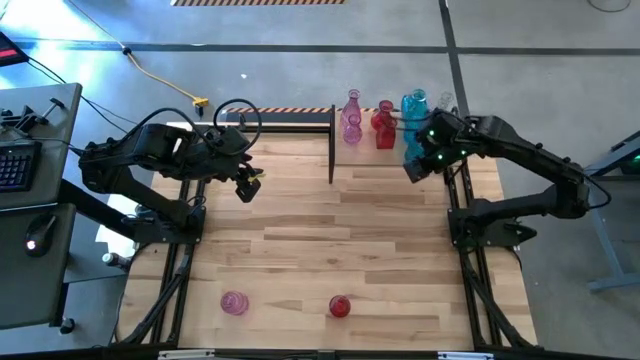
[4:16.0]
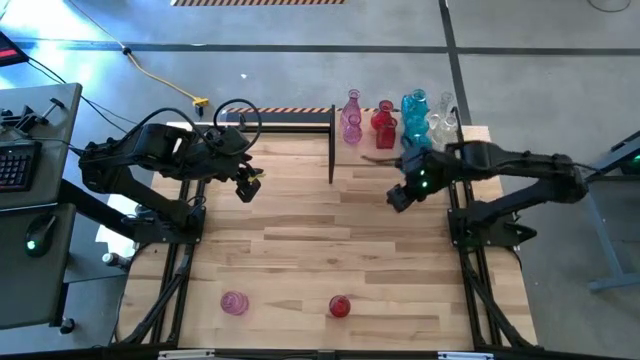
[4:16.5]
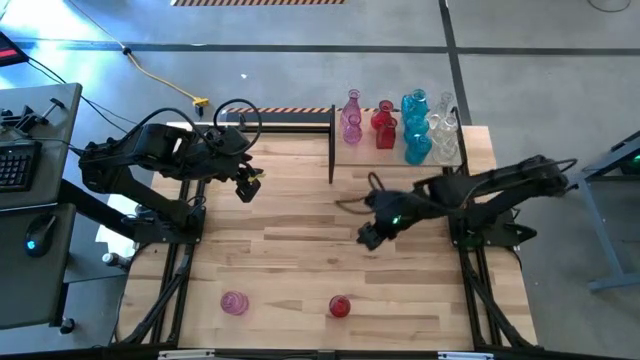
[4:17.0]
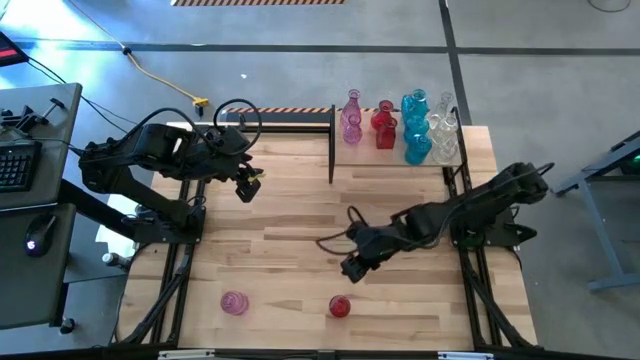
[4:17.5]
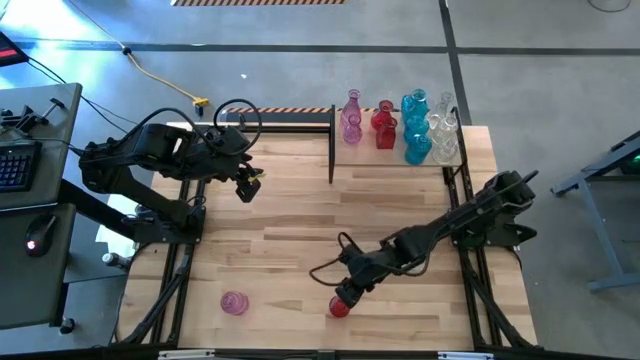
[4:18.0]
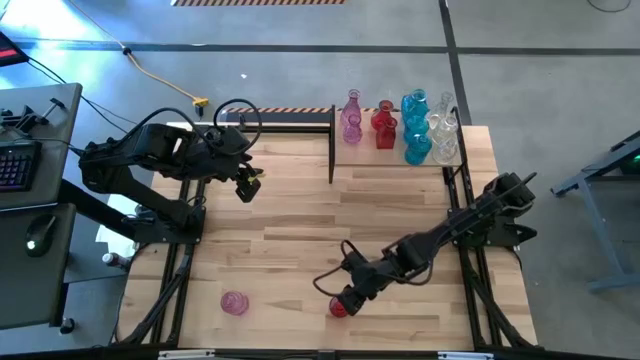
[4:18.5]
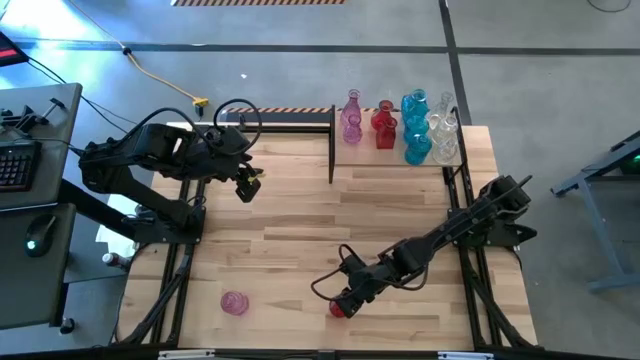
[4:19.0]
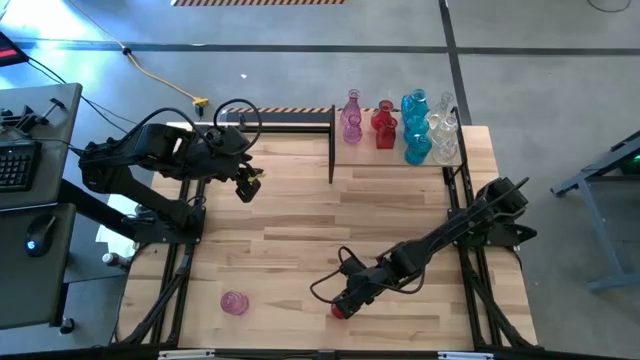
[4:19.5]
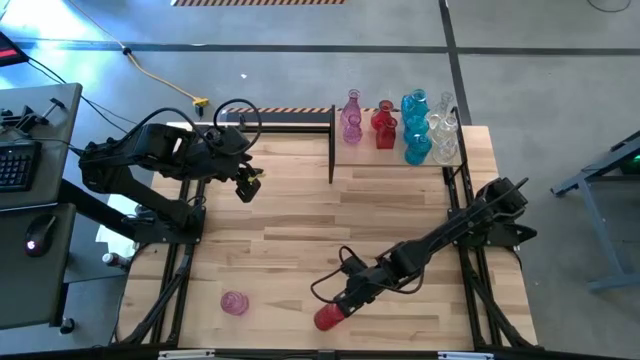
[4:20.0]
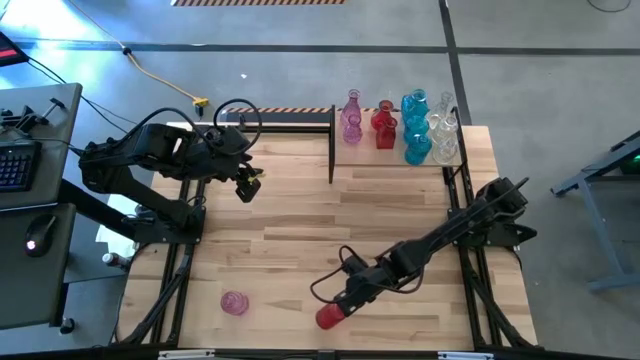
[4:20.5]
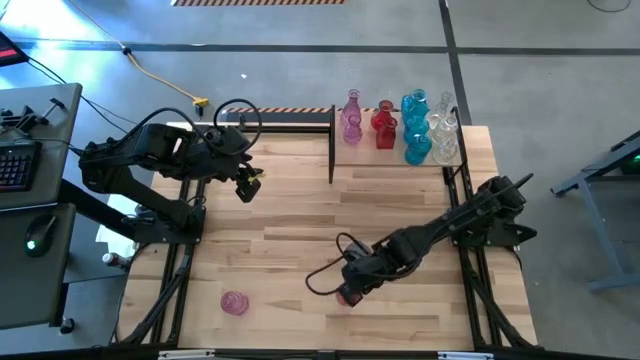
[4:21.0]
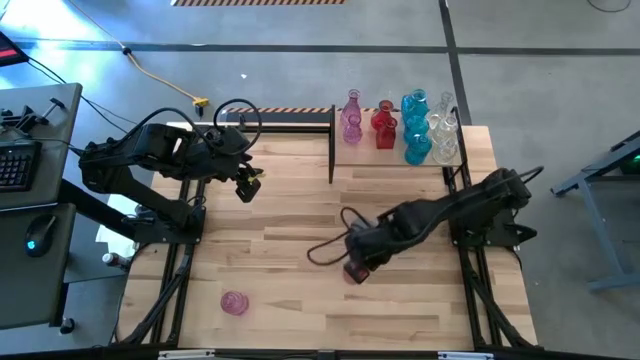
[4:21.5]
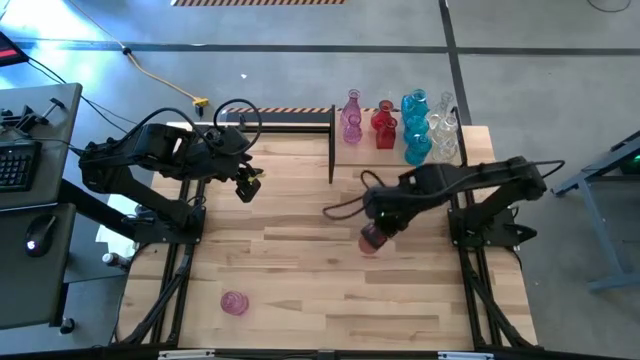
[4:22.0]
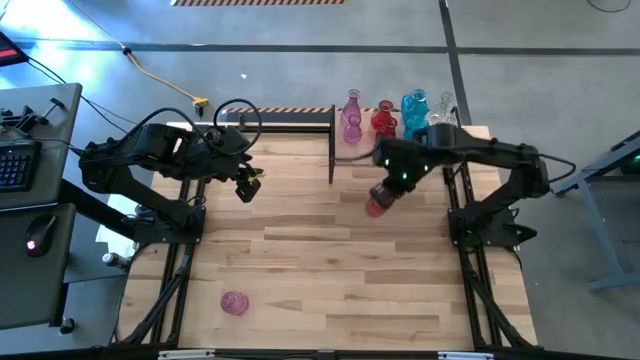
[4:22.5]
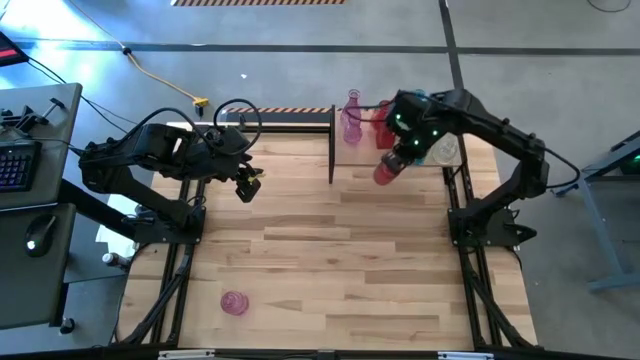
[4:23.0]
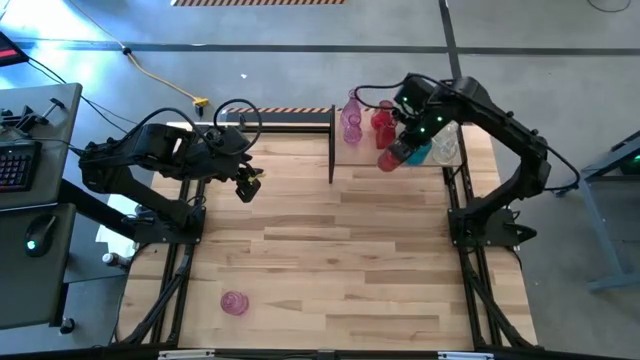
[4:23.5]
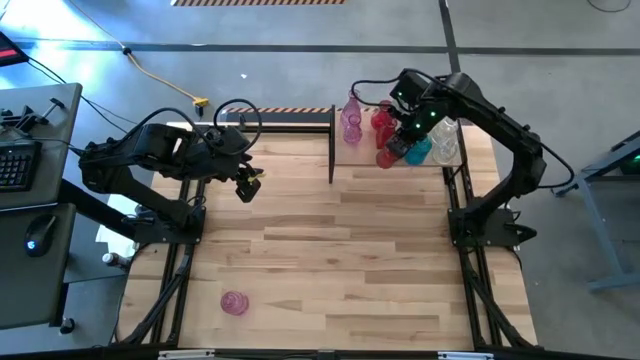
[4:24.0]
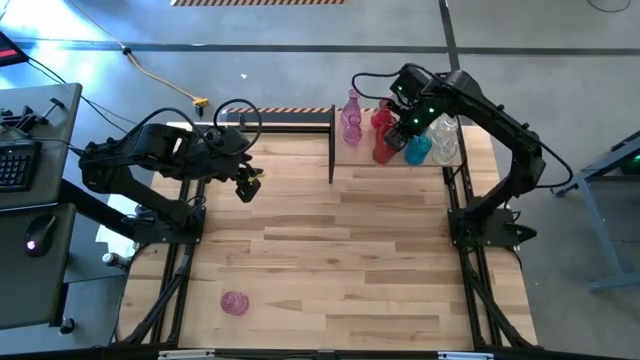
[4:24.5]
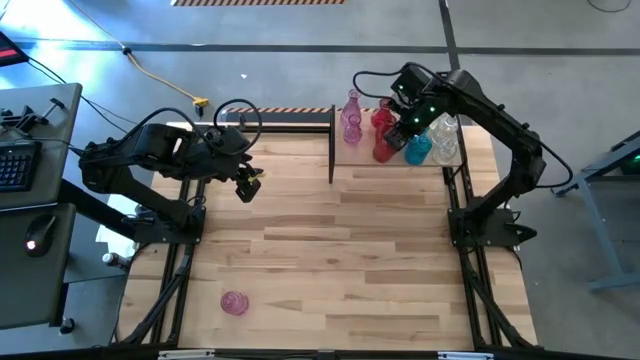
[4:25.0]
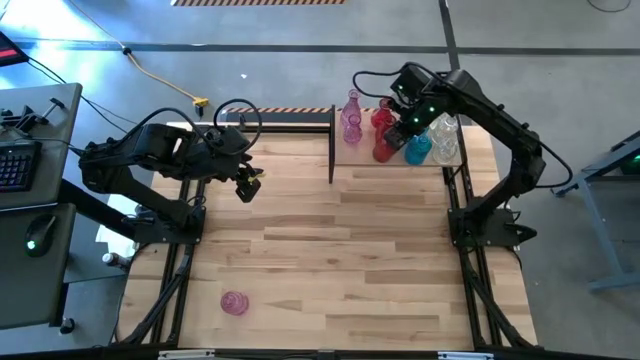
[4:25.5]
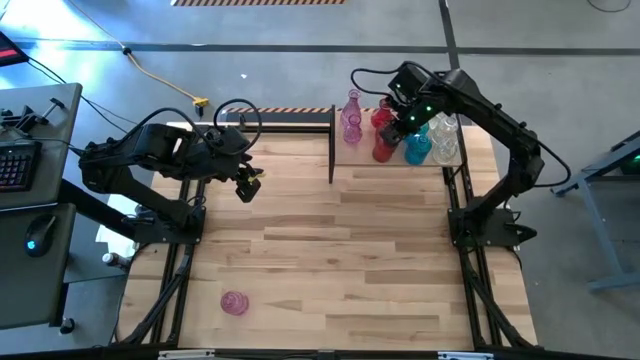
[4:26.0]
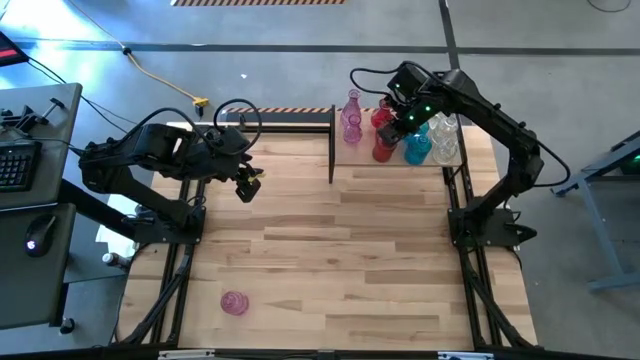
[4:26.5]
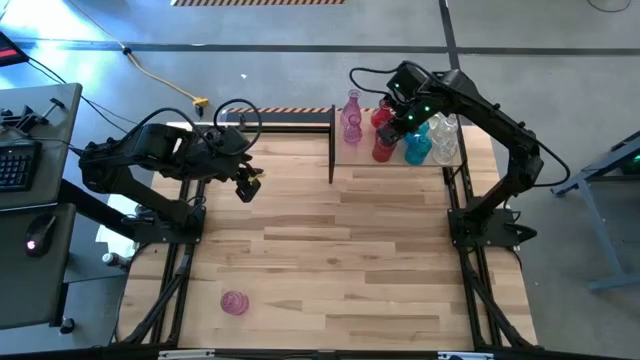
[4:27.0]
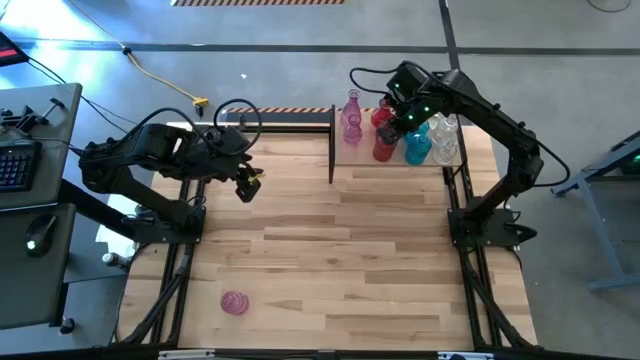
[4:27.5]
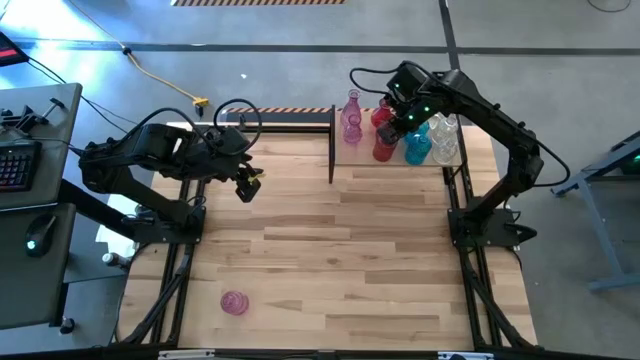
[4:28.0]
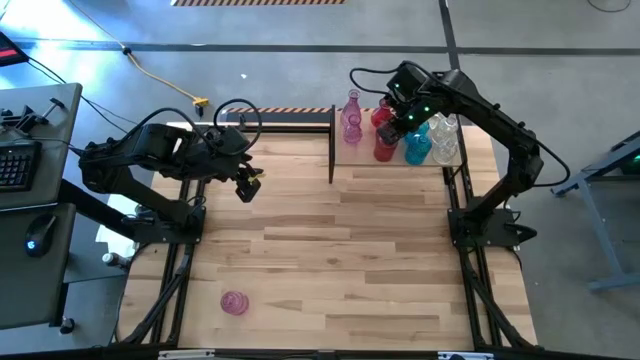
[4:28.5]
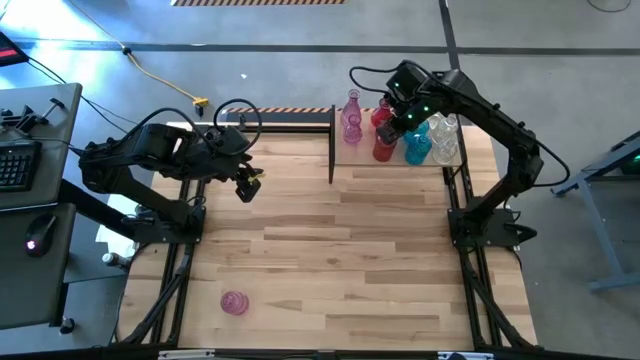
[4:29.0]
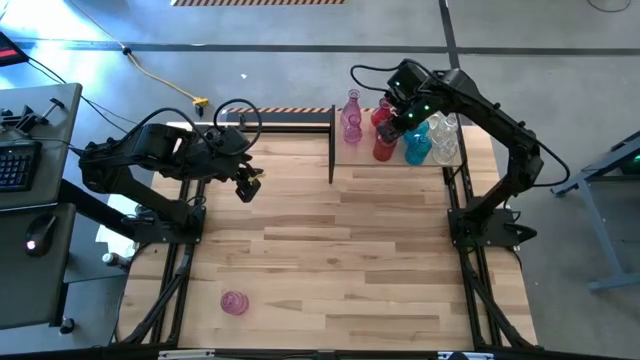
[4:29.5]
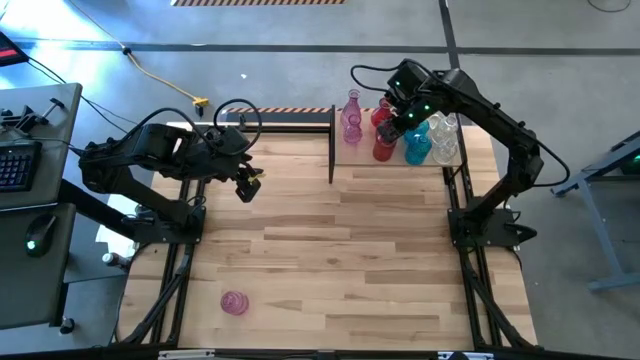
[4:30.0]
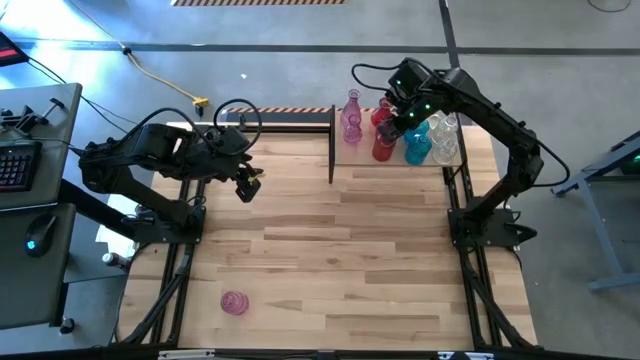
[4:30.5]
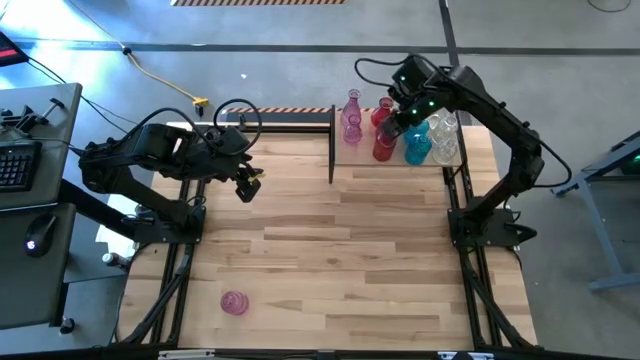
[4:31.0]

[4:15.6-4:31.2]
Task: sort vases onto shelf
Put the red vase on the shelf aligned with the red vases

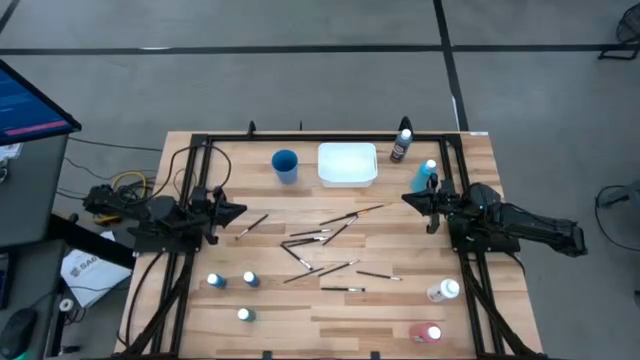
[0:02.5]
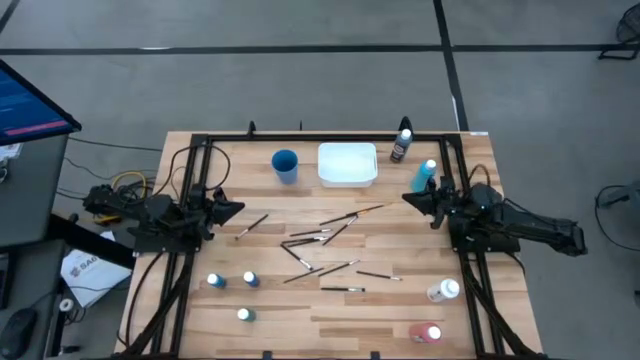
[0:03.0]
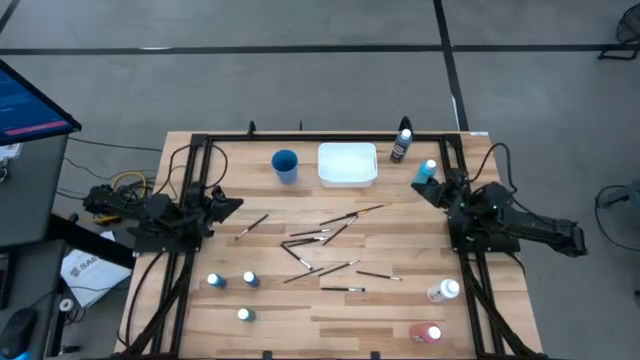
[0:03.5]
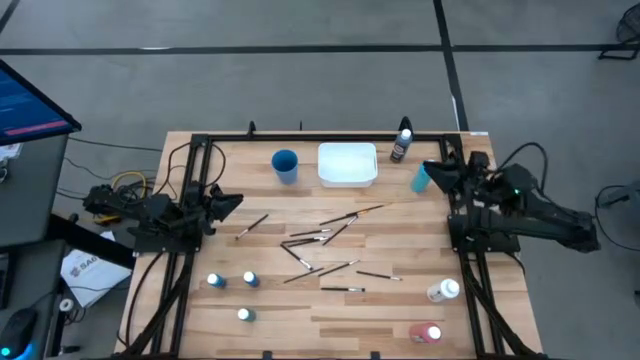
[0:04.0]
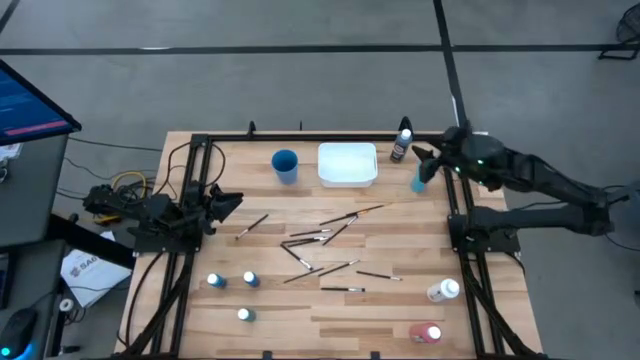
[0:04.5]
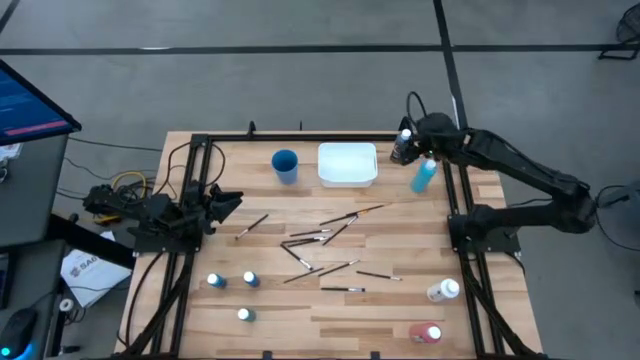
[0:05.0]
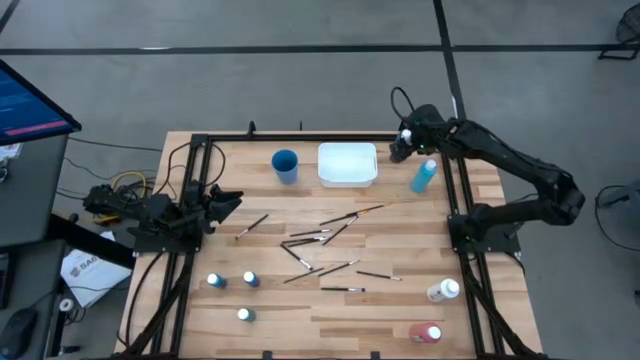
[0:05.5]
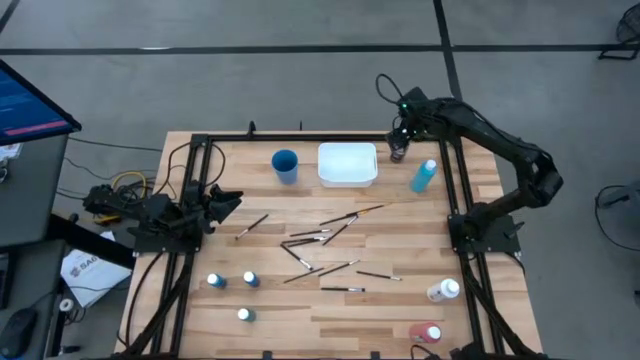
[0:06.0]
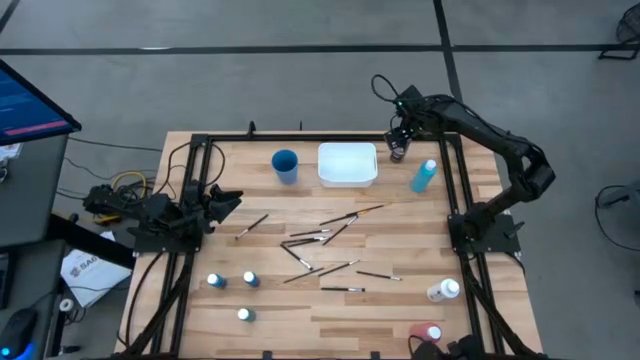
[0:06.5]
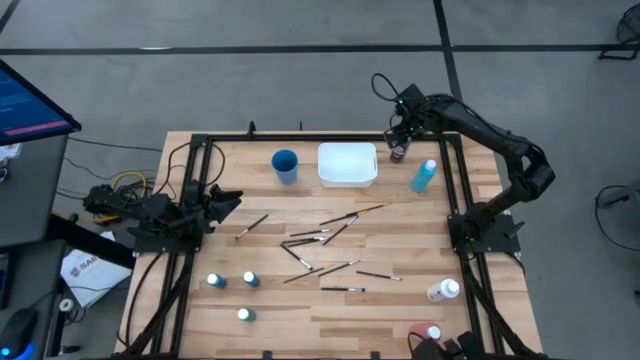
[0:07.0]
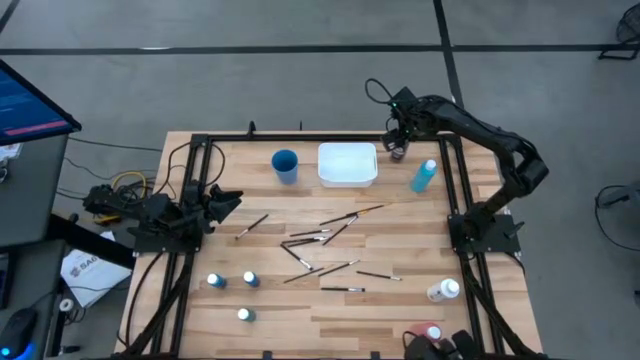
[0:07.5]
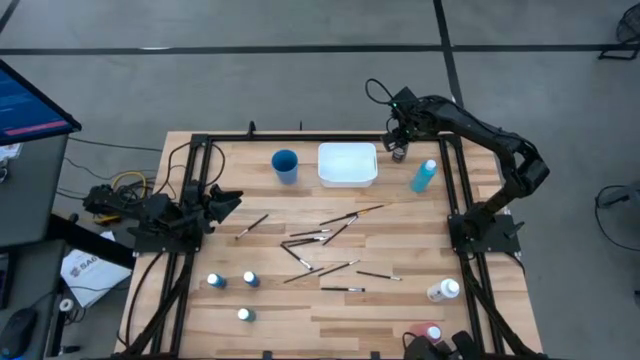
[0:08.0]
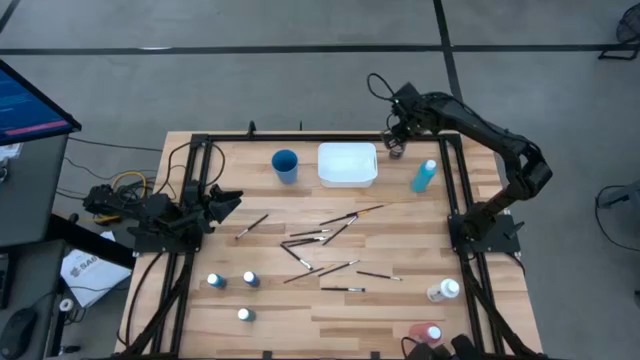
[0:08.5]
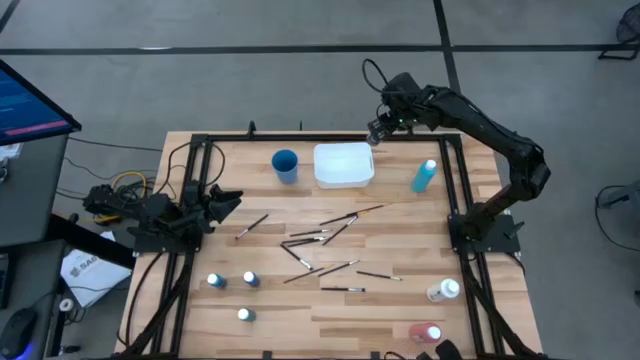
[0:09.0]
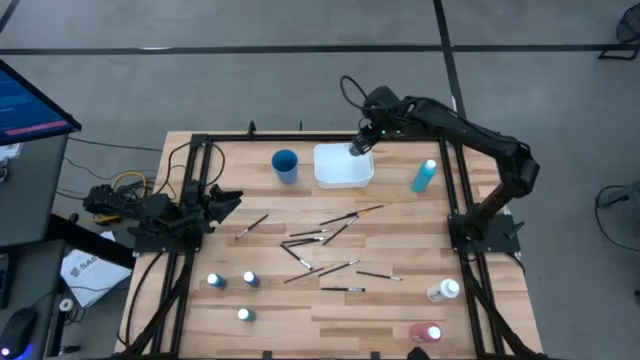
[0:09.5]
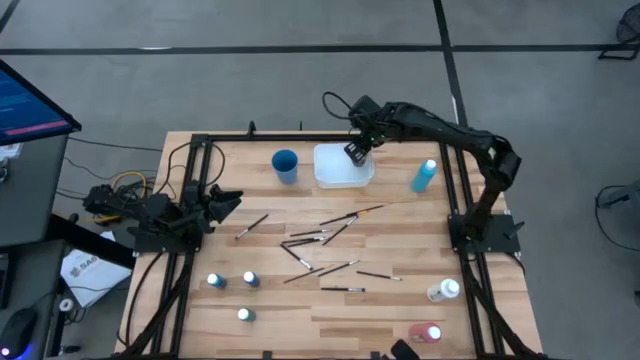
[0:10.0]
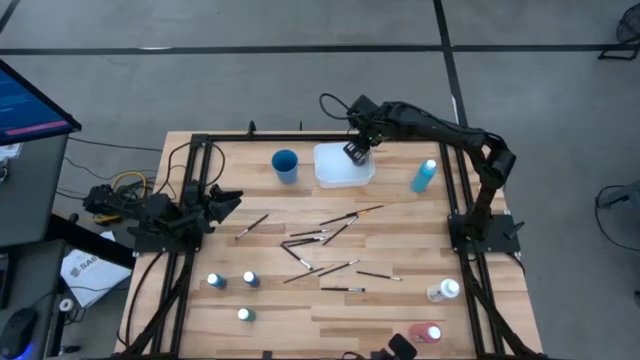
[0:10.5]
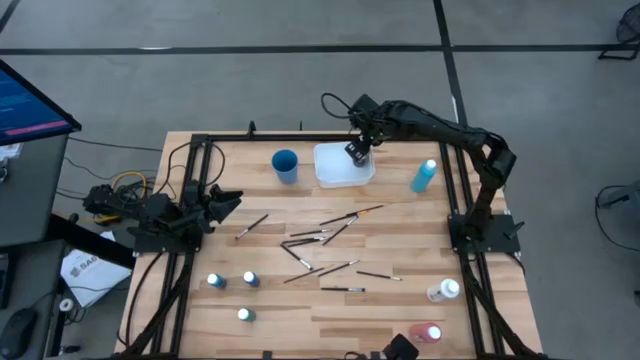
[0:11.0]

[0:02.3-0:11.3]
Task: Pick & Place Paint Supplies
Put the black paint bottle into the white bin
